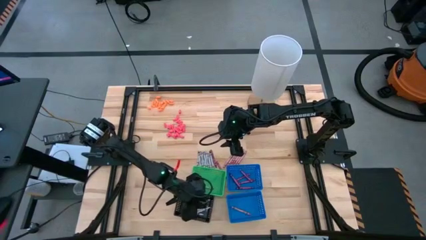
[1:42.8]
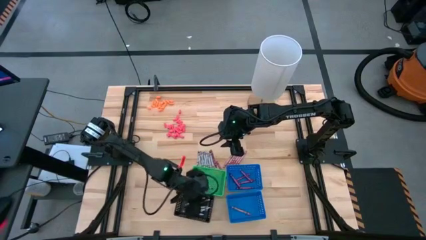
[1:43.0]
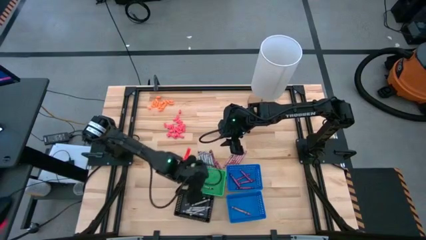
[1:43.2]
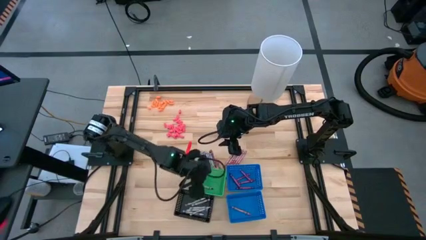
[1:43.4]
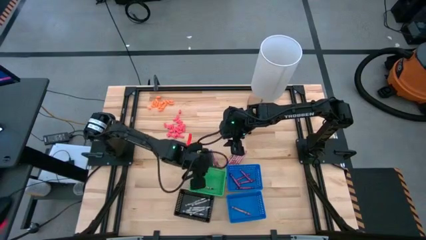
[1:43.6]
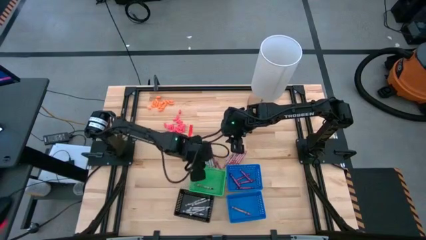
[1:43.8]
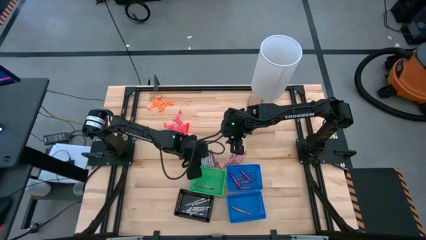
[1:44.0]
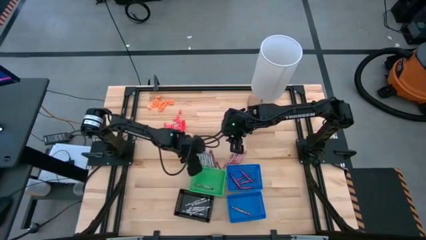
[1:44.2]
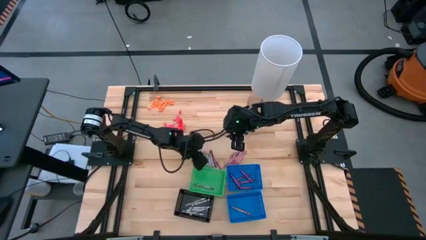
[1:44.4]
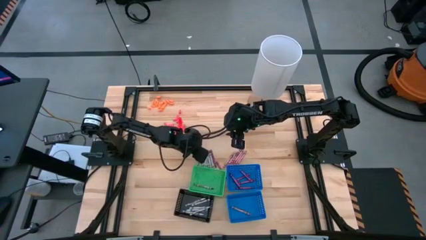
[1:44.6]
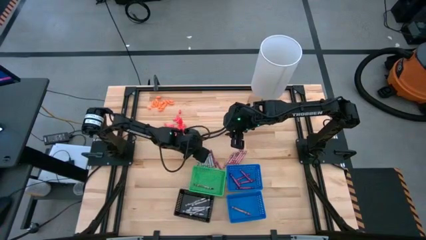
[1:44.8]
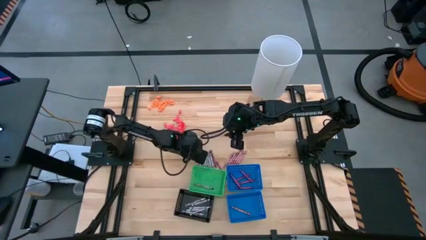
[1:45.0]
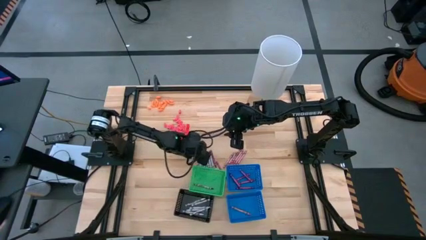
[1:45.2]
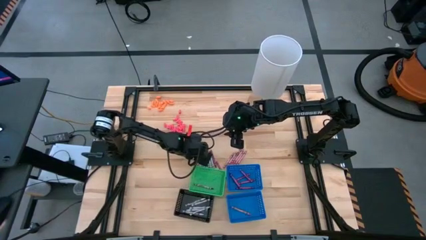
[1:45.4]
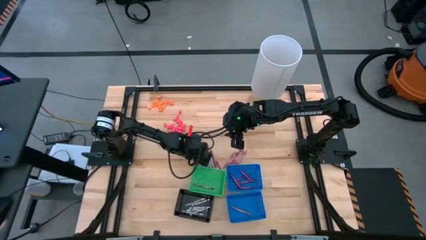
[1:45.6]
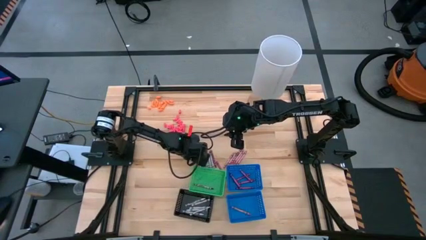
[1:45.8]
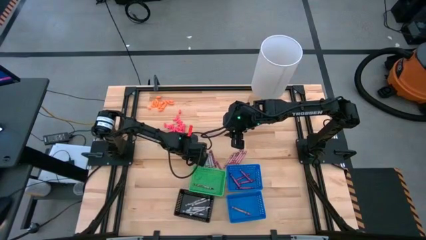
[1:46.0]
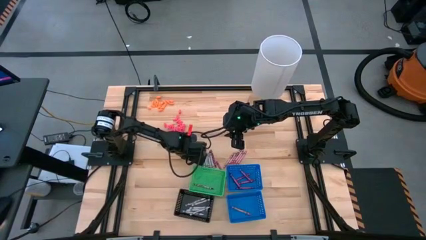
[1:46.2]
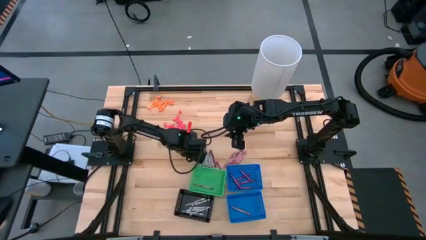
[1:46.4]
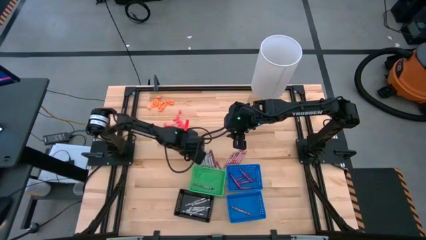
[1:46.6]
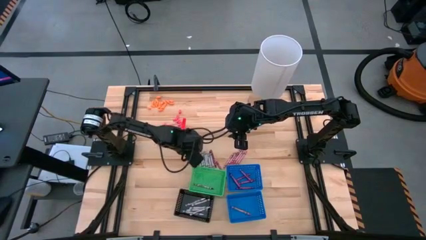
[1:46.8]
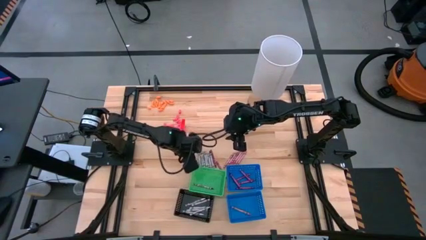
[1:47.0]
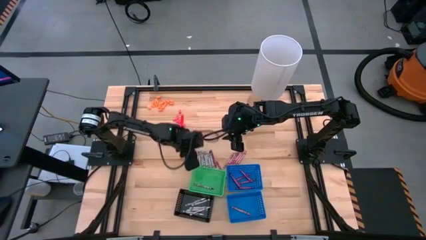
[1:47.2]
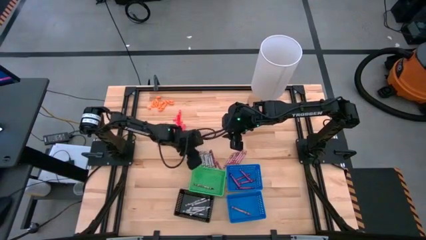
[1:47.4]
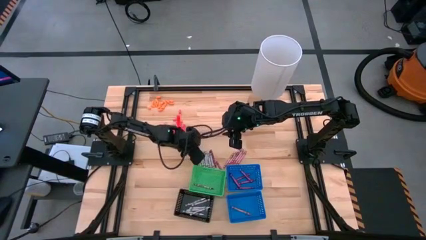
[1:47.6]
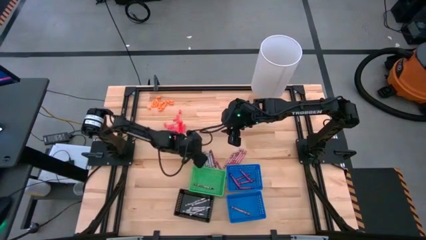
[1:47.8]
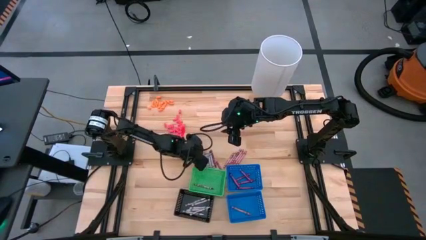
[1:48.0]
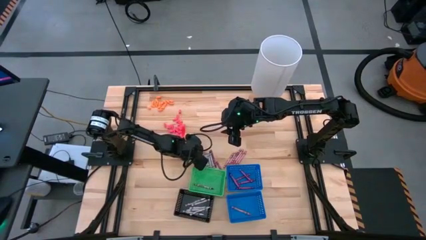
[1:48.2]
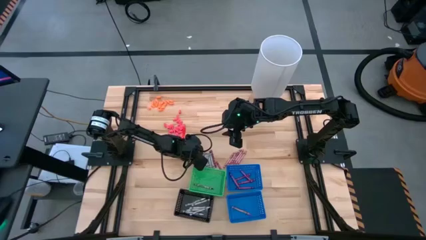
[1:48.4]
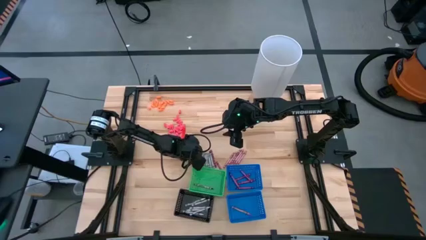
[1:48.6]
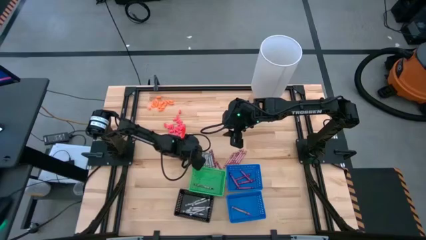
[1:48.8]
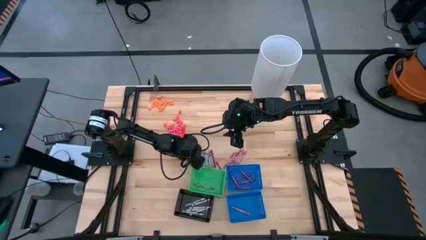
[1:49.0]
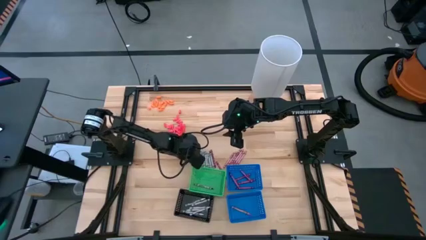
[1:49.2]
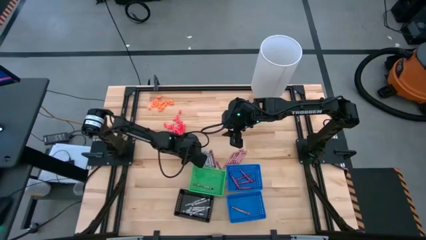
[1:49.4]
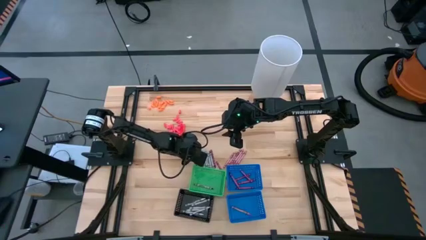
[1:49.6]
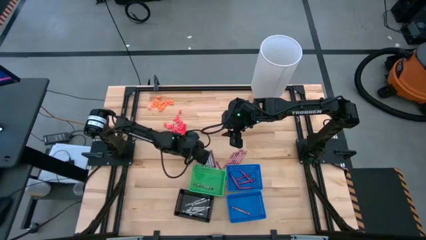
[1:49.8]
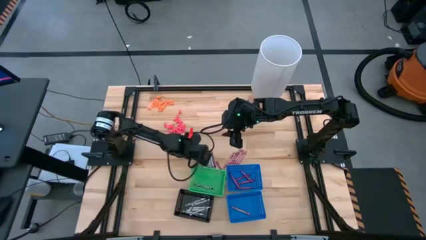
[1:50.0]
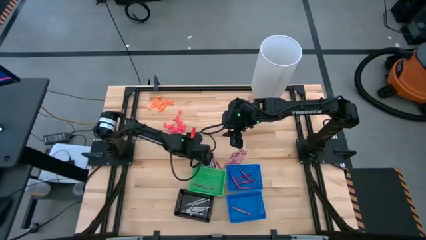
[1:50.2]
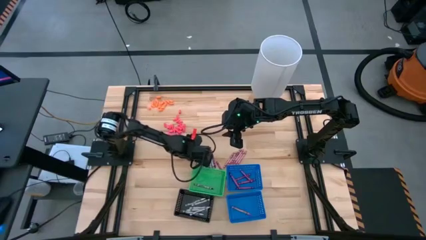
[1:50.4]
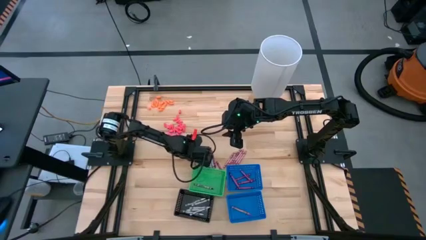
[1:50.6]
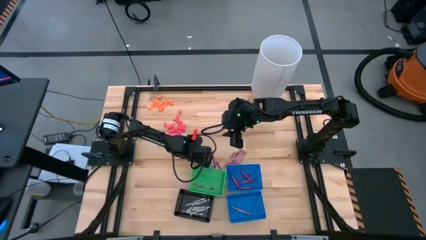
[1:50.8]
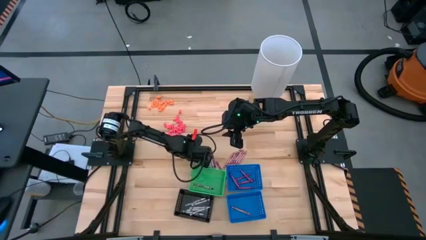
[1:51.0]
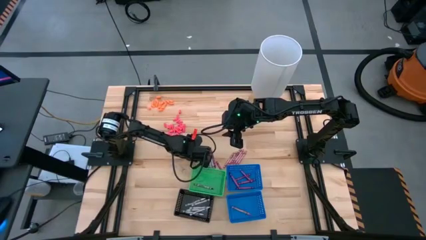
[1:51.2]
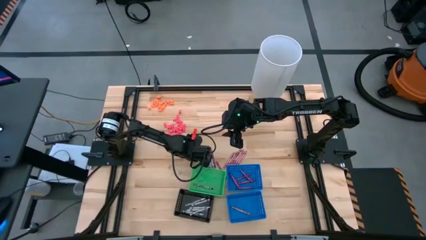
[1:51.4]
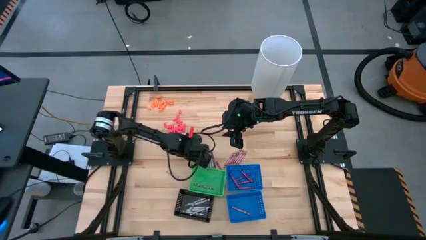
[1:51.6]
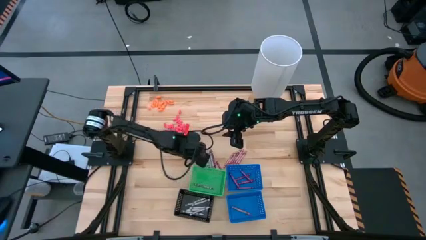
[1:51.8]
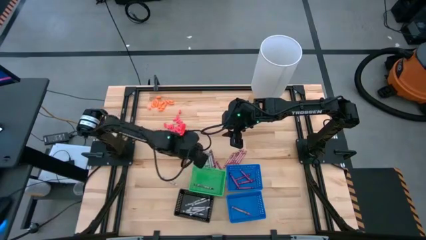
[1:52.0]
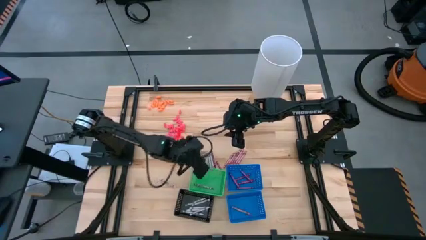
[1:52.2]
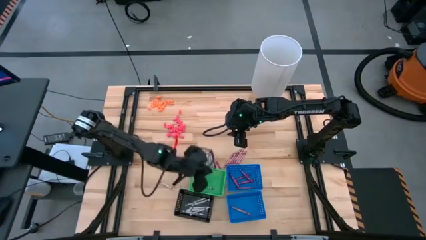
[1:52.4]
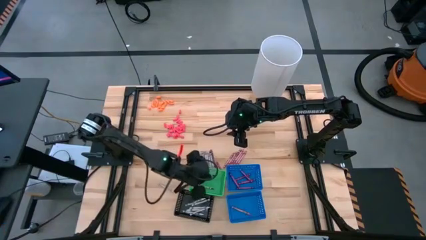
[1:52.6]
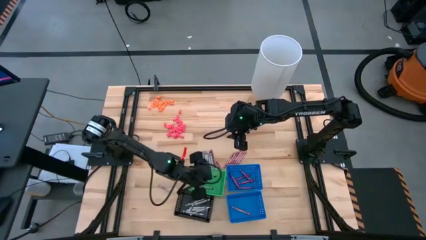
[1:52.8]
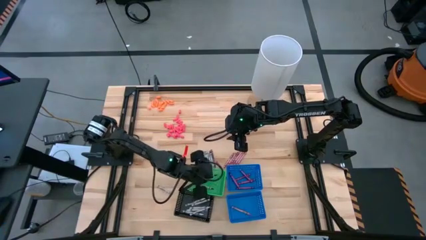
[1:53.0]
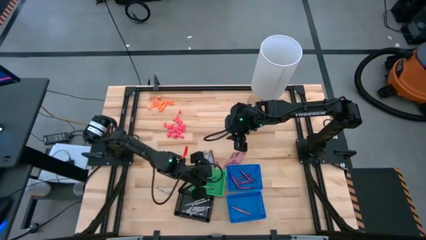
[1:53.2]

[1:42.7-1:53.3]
Task: Sort crayons
Put the black crayon into the green bin

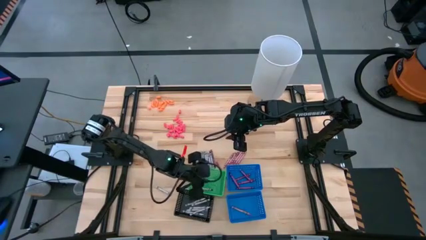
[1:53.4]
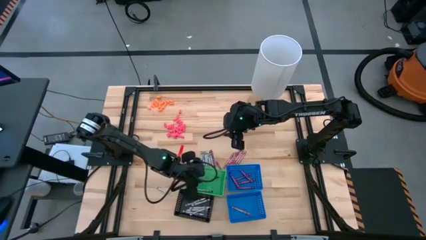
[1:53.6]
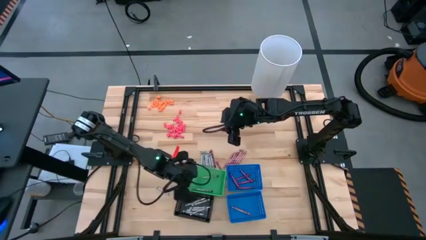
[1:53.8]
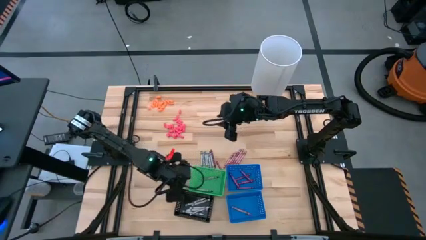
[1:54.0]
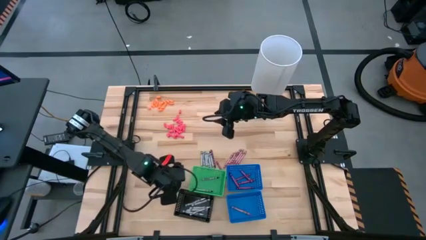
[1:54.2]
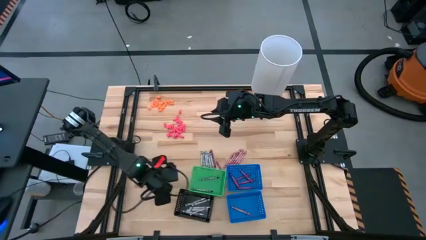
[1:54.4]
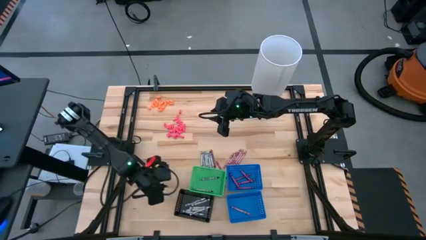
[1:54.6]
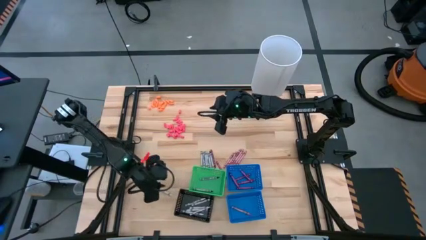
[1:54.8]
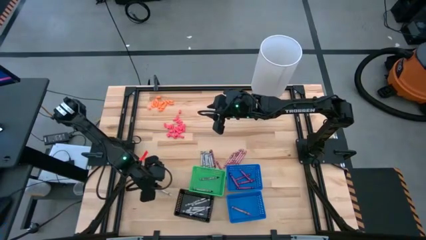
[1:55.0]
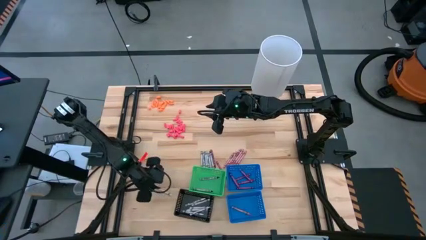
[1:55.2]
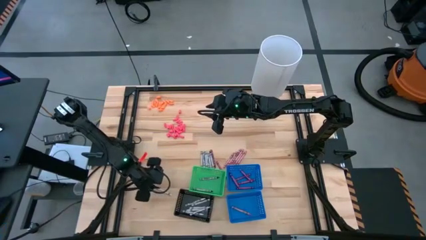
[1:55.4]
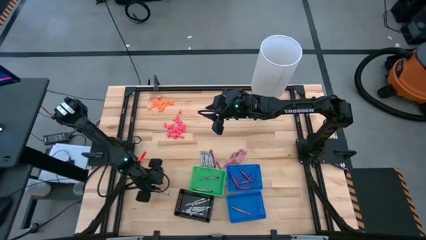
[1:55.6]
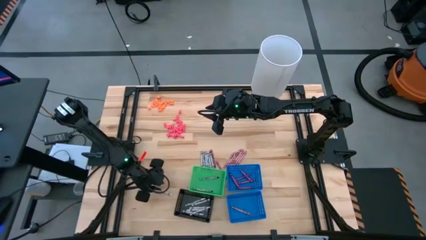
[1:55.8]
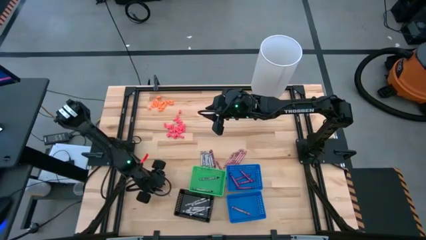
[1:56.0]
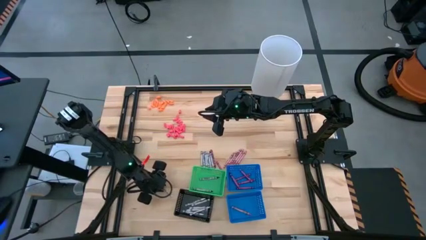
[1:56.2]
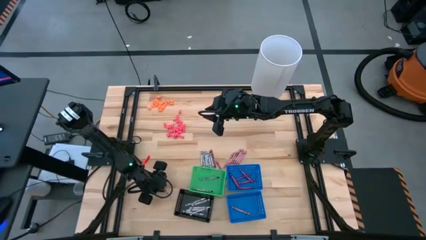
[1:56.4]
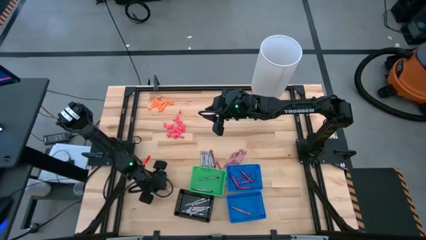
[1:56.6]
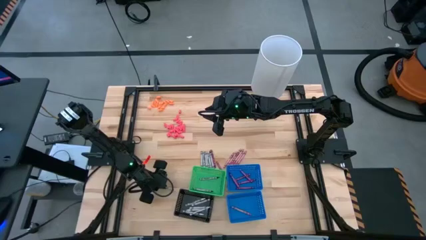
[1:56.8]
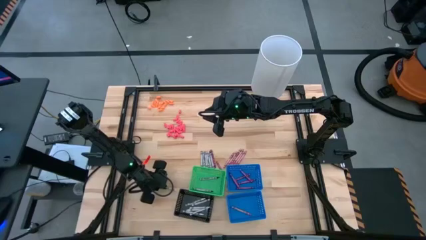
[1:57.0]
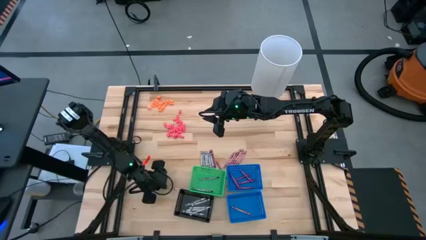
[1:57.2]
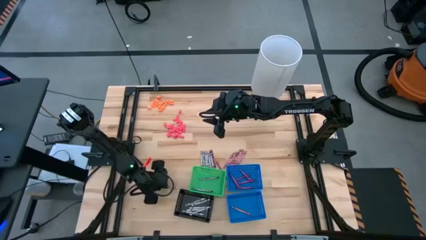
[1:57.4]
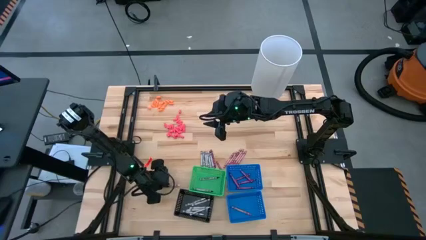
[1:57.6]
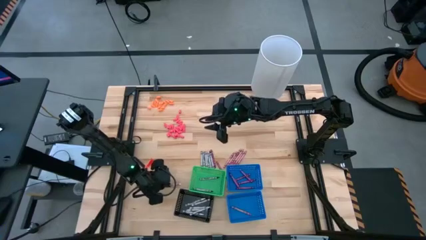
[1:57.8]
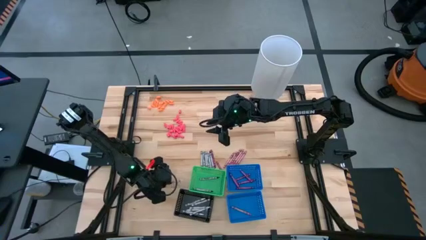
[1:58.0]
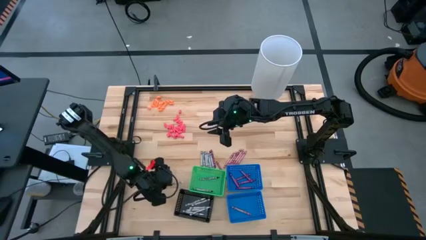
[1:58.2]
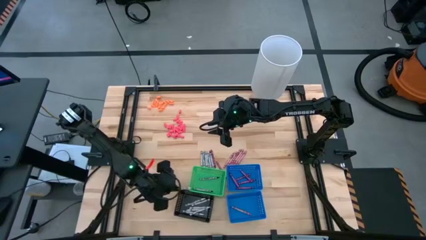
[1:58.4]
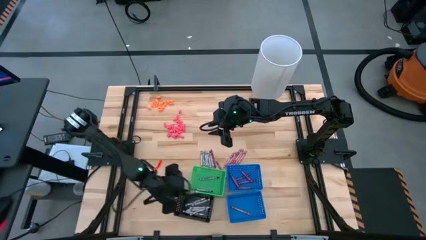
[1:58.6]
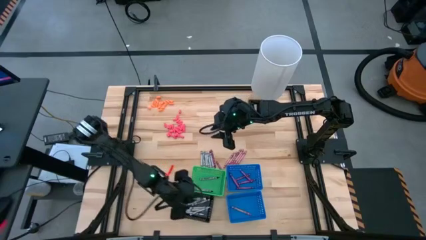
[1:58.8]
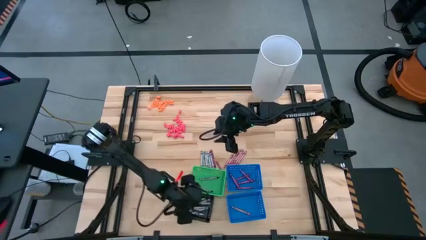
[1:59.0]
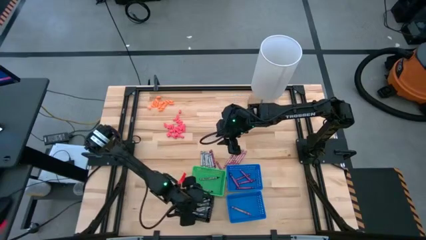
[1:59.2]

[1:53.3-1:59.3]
Put the white crayon into the black bin

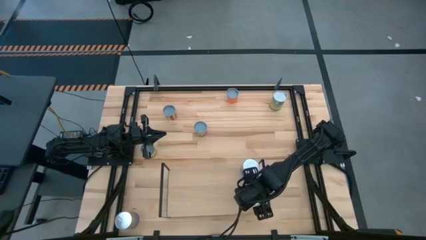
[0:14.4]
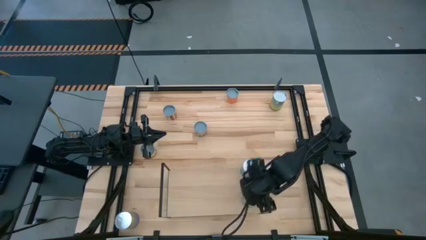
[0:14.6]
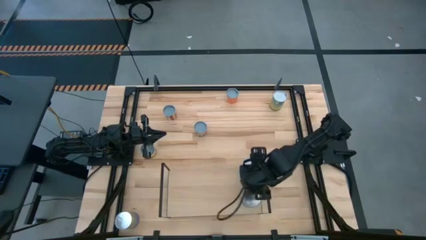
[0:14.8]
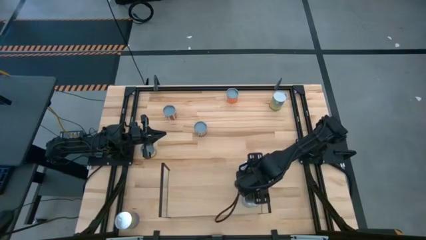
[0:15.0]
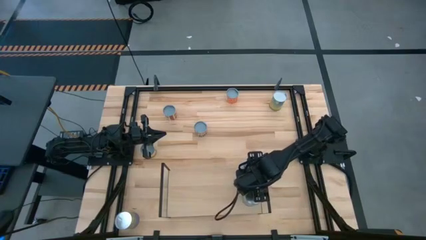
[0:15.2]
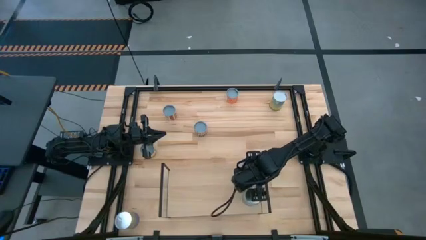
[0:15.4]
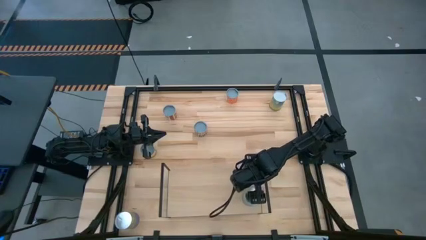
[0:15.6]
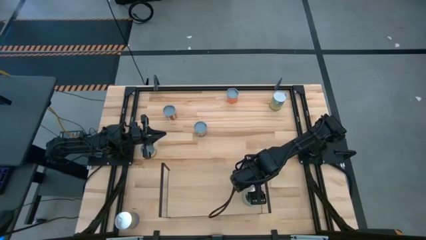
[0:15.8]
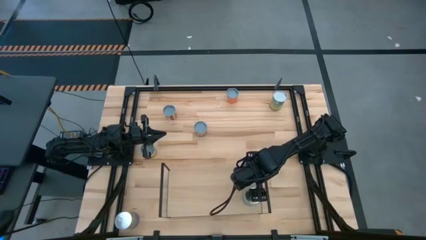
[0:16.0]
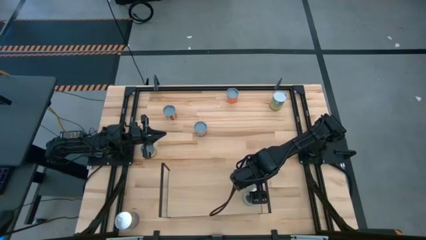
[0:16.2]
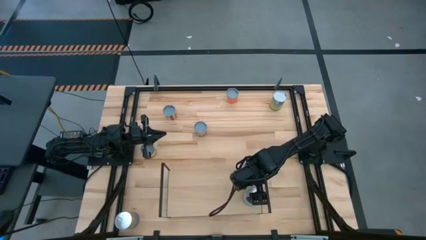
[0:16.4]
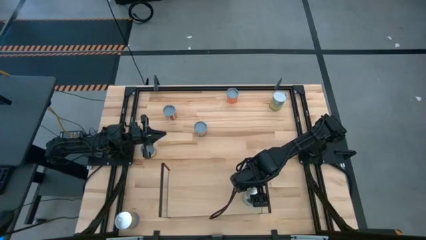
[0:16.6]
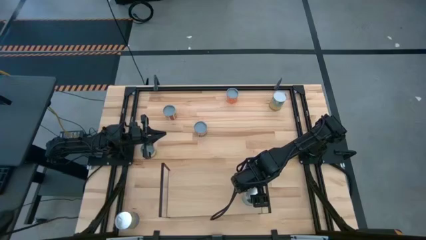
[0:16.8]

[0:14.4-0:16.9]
Task: Pick and place cans onto a shelf
Adjust the canned tomatoes on the shelf
